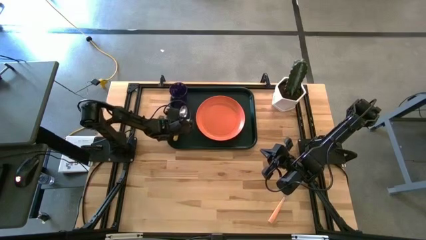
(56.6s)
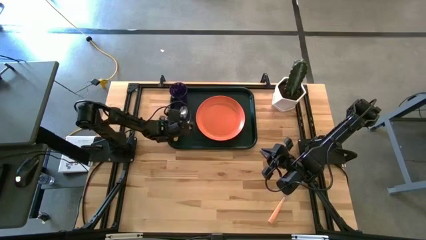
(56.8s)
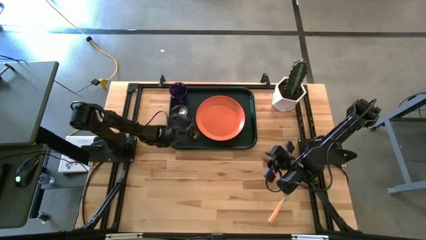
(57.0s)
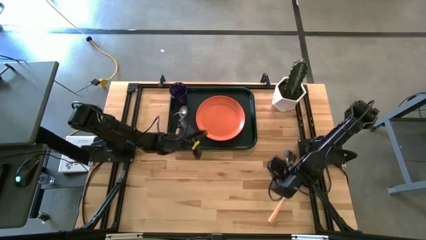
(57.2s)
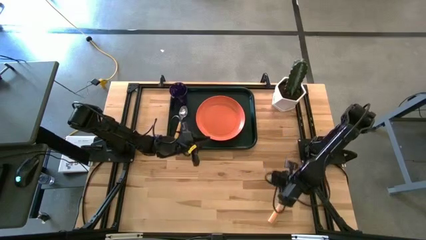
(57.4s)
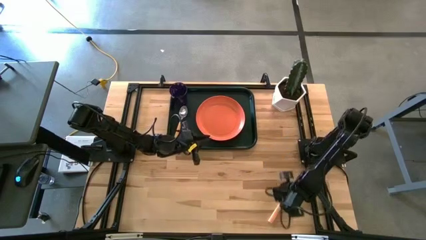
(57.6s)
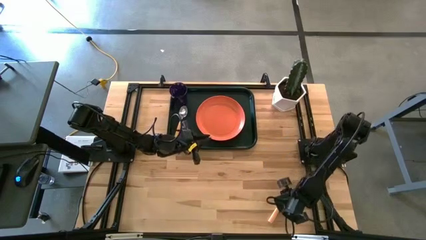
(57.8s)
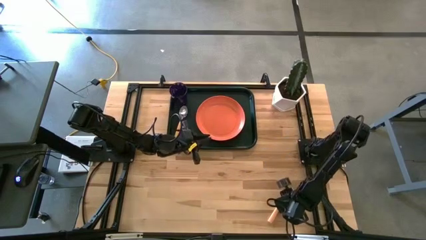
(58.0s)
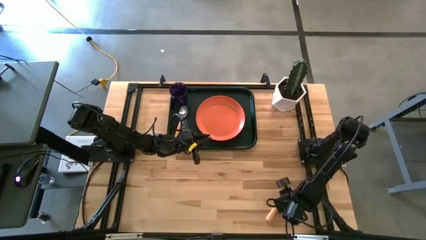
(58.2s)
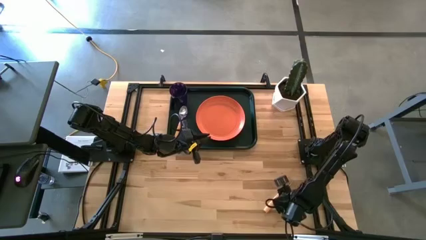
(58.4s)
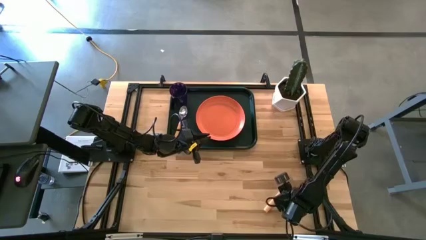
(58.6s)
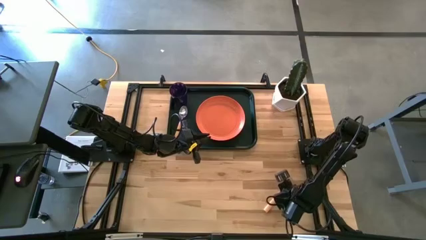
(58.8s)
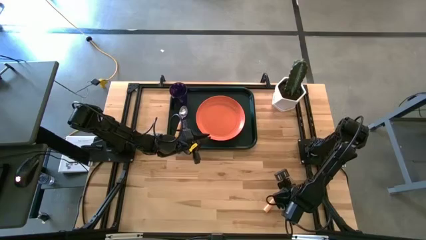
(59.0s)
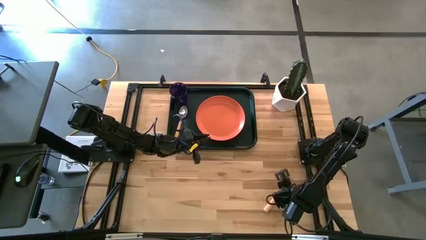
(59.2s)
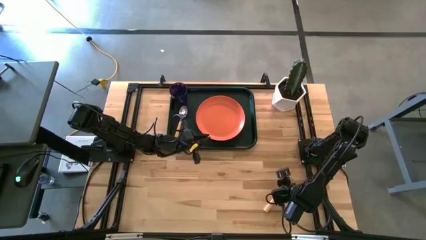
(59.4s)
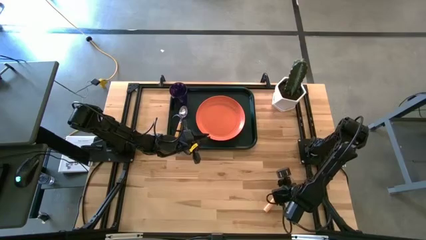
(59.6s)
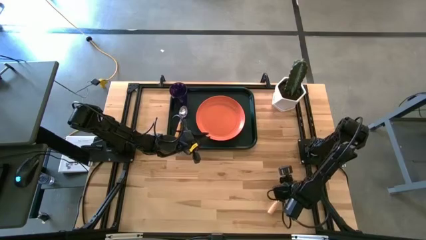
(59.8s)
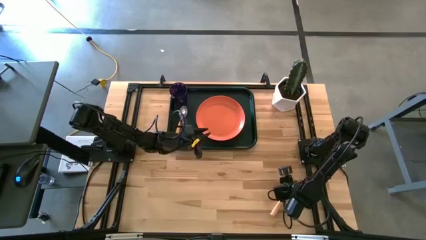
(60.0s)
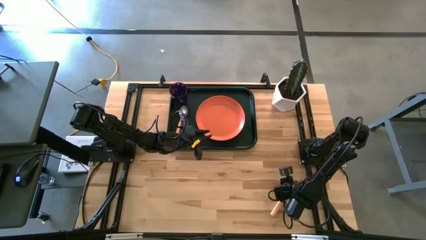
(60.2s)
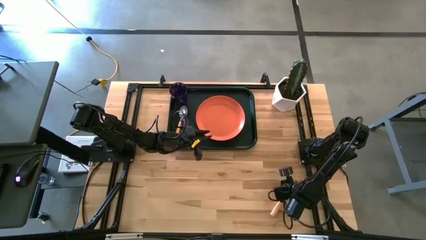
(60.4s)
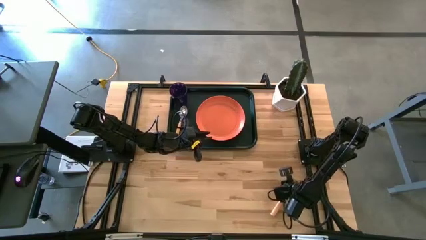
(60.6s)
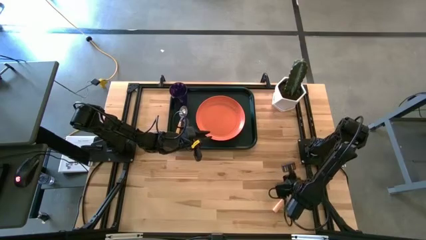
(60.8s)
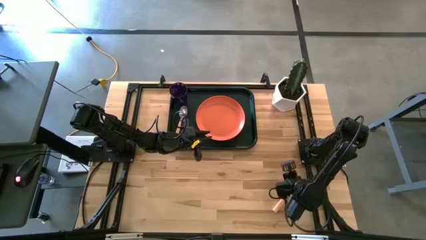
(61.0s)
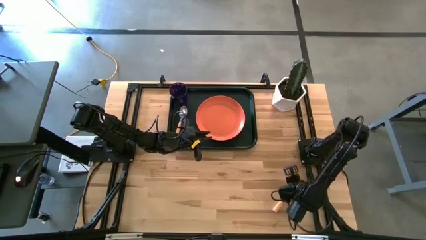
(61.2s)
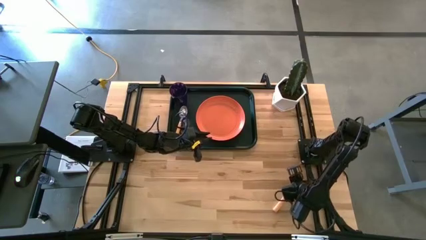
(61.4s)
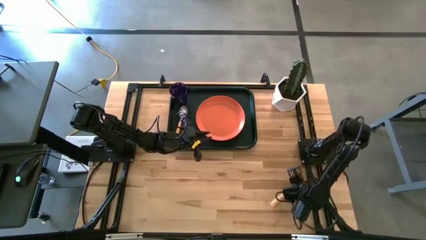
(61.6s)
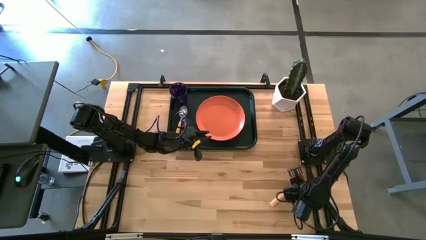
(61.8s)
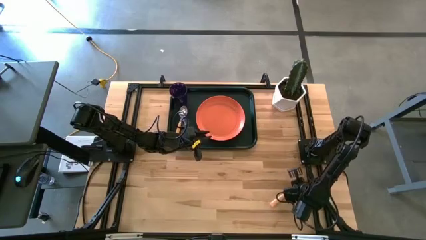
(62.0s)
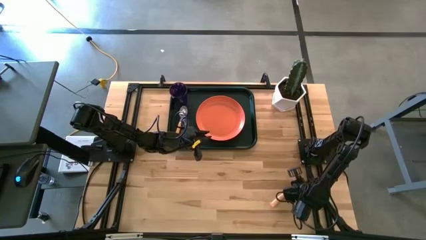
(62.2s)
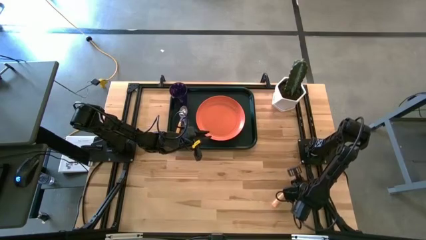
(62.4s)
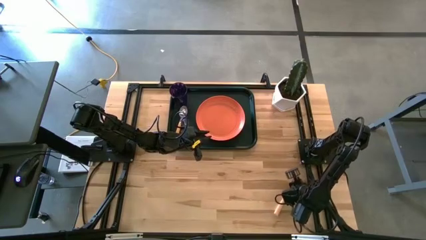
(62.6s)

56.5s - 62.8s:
Task: Pick and place plate/cup/fork/spoon on tray
Put the fork on the left side of the serving tray, between the plate and the spoon

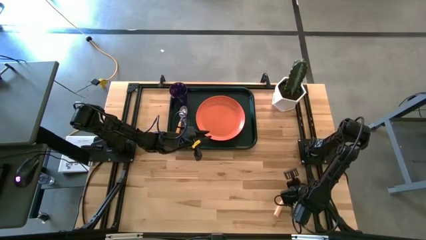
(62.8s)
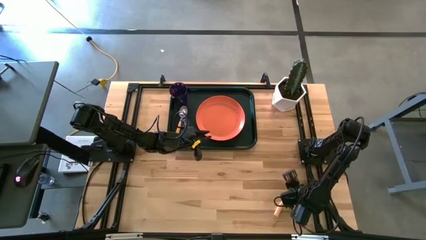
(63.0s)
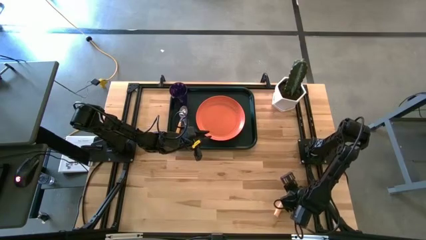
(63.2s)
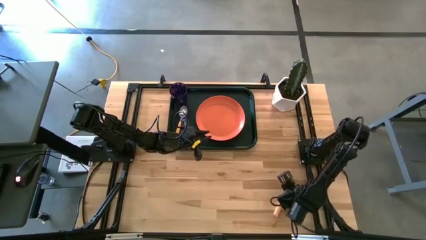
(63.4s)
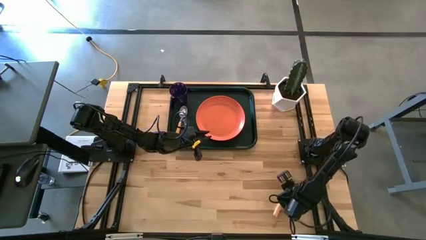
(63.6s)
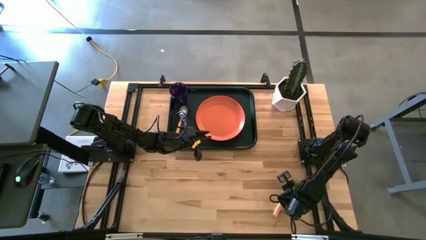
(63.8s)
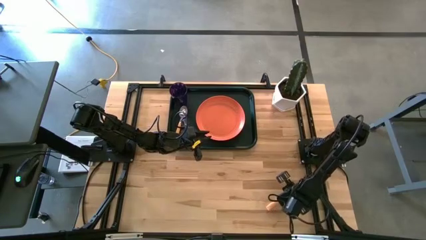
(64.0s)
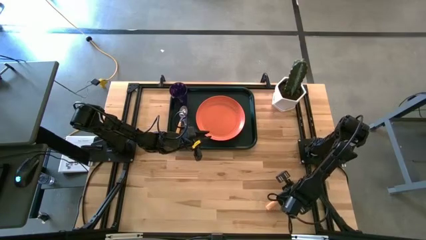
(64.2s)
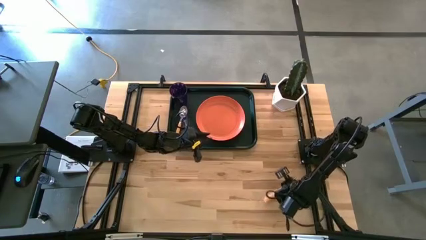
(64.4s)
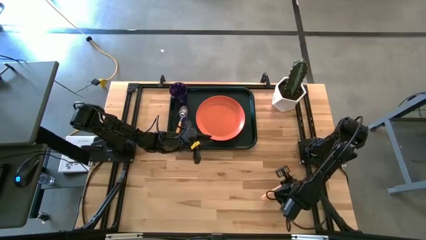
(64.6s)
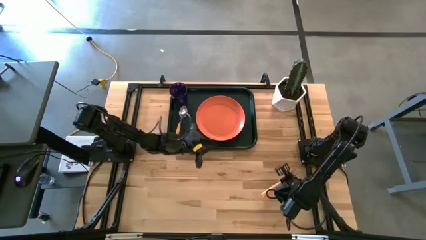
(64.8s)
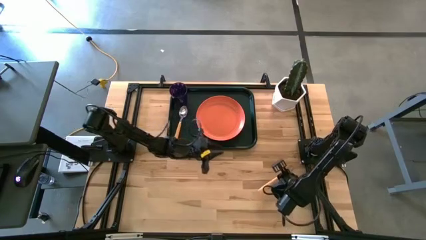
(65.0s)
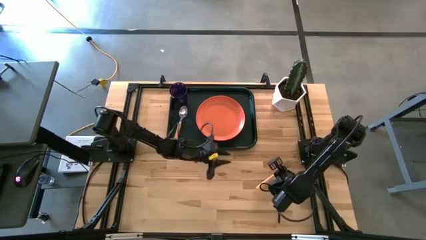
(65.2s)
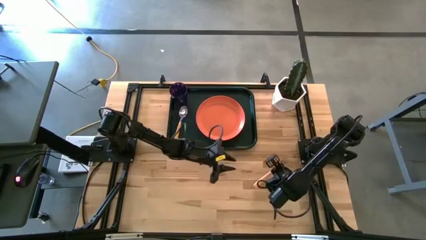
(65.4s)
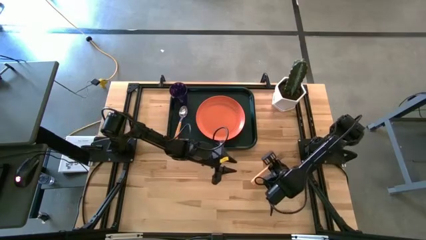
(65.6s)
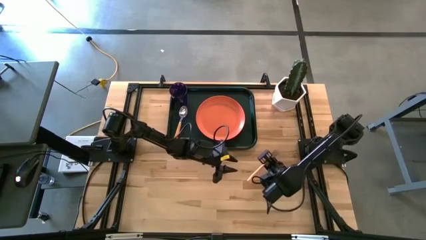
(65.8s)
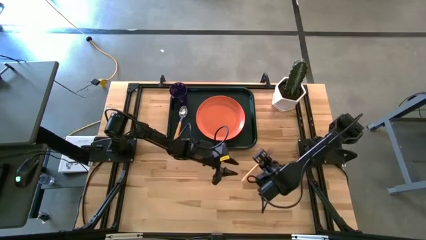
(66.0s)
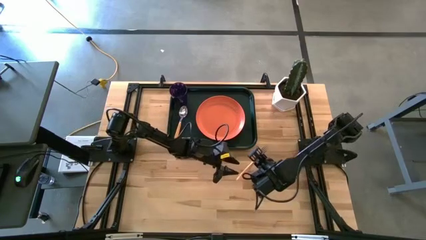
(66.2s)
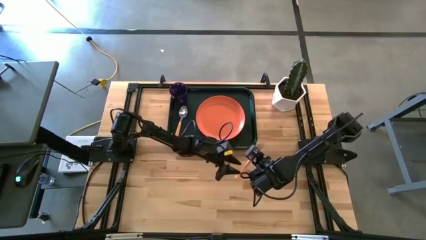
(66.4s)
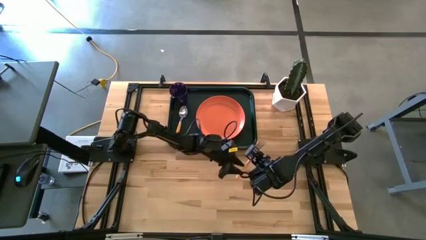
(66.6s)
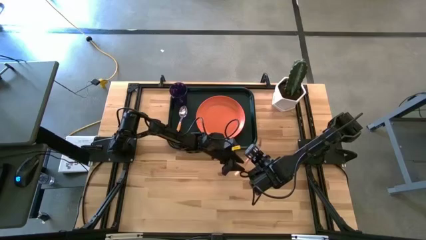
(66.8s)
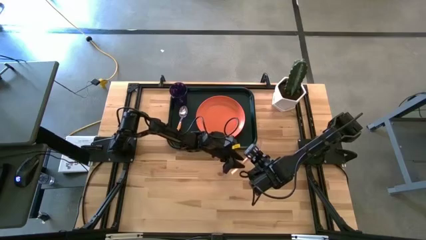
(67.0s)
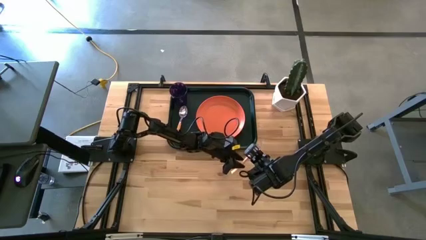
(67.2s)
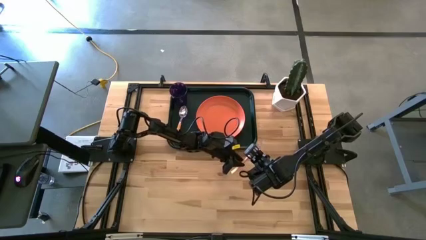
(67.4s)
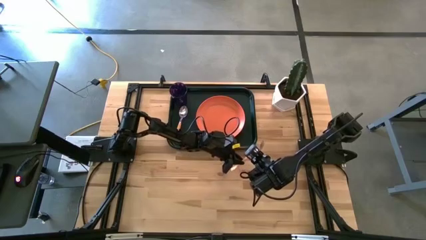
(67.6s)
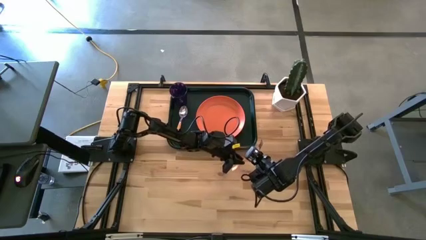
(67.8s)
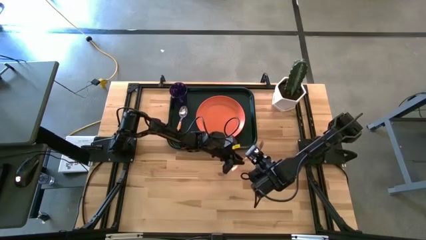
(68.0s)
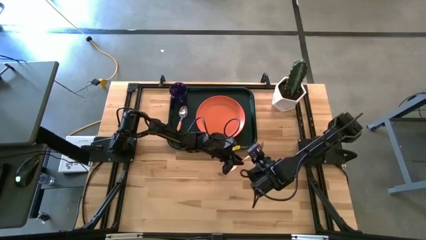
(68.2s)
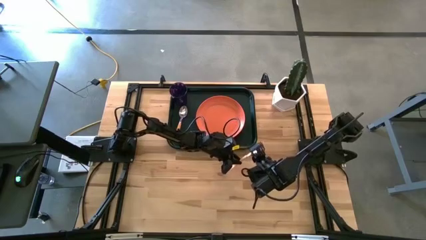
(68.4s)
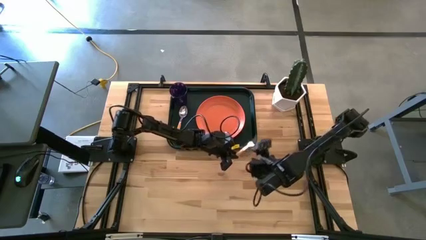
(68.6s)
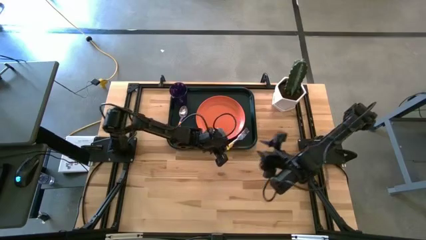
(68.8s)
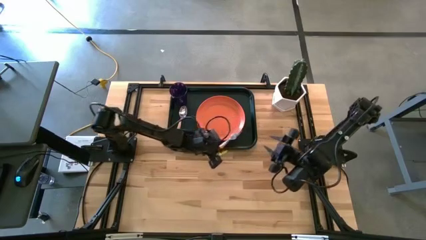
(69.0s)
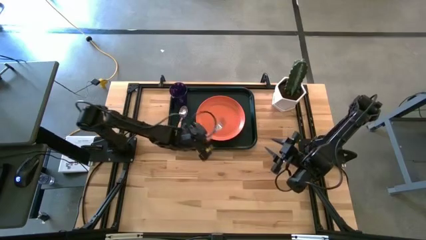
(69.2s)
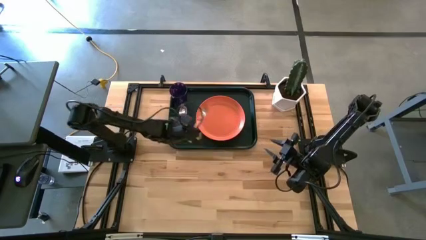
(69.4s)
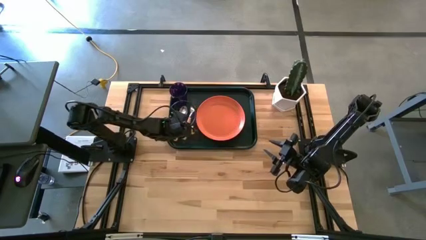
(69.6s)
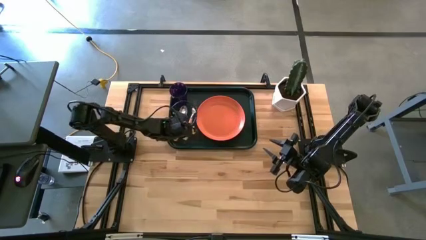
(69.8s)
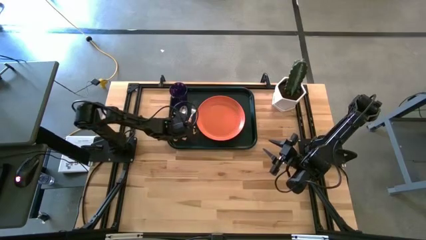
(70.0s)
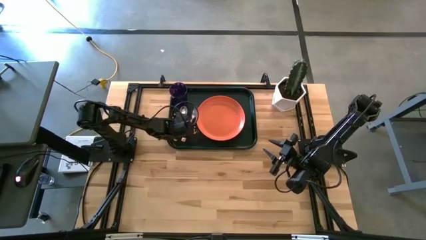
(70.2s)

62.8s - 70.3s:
Put the fork on the left side of the serving tray, between the plate and the spoon

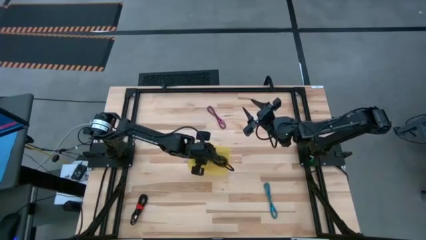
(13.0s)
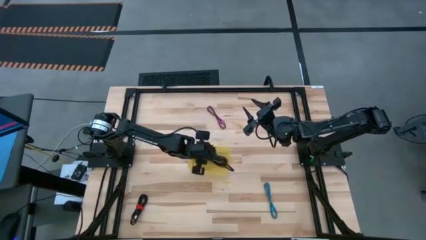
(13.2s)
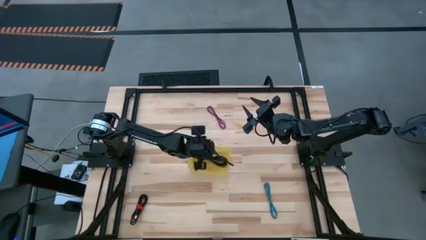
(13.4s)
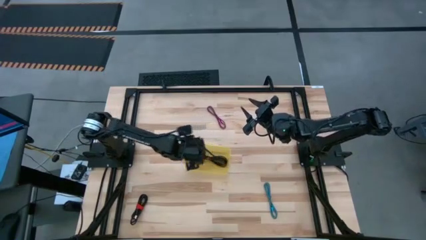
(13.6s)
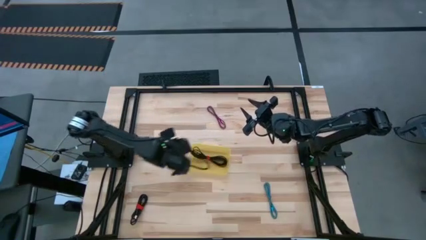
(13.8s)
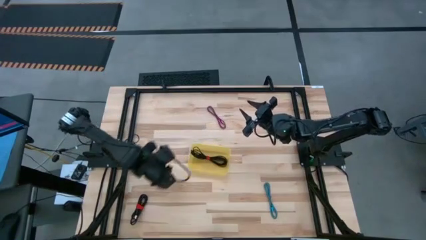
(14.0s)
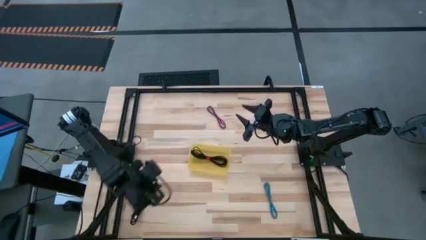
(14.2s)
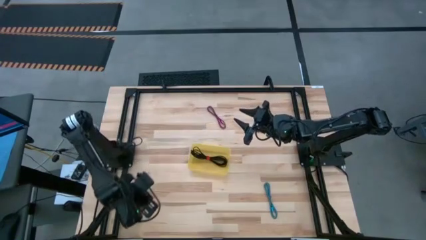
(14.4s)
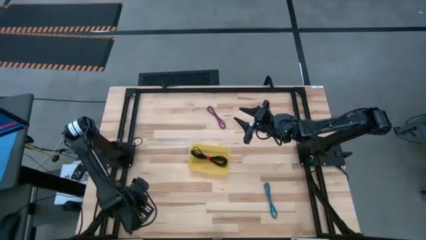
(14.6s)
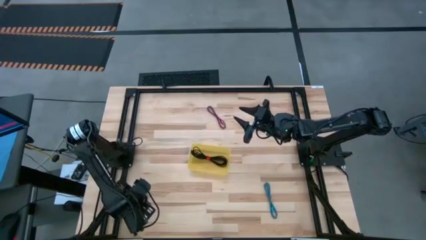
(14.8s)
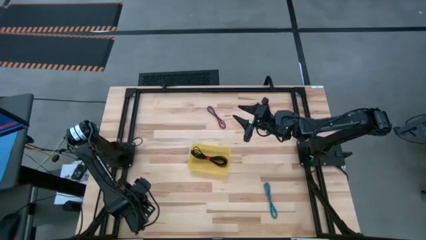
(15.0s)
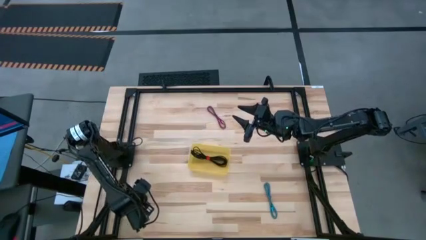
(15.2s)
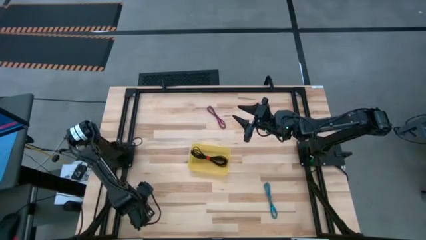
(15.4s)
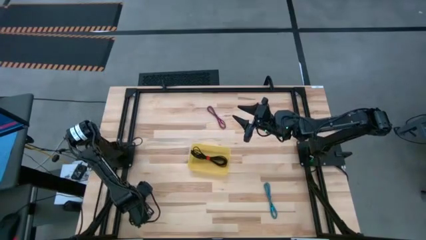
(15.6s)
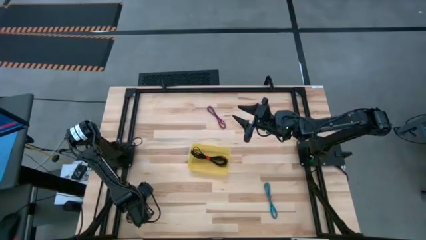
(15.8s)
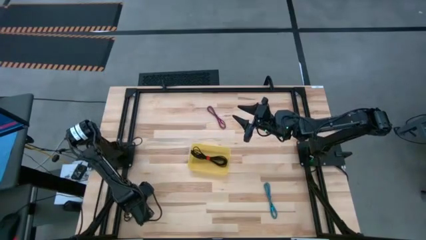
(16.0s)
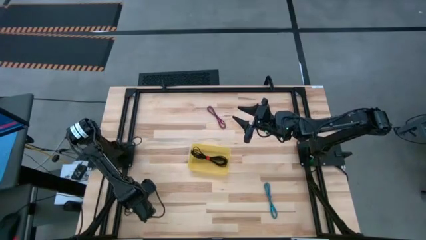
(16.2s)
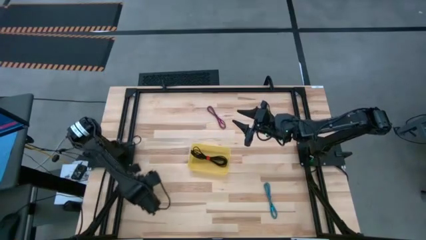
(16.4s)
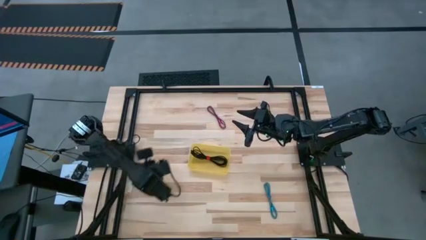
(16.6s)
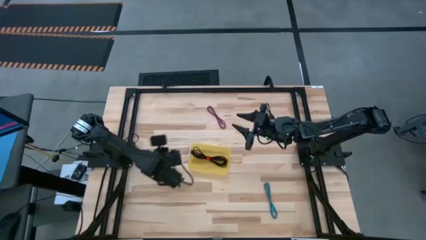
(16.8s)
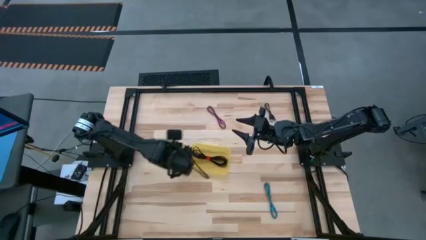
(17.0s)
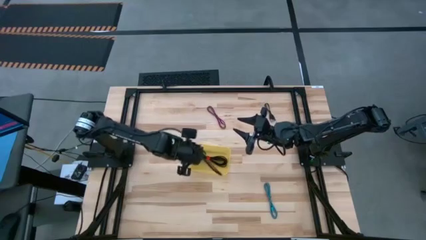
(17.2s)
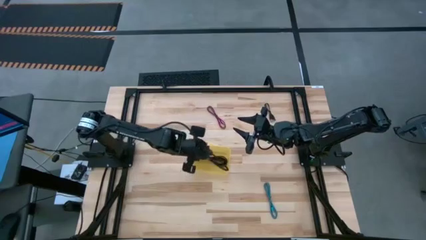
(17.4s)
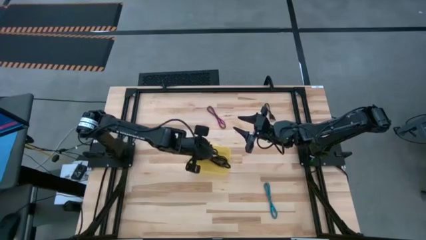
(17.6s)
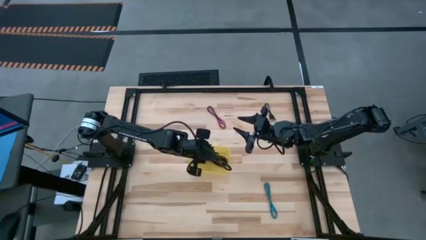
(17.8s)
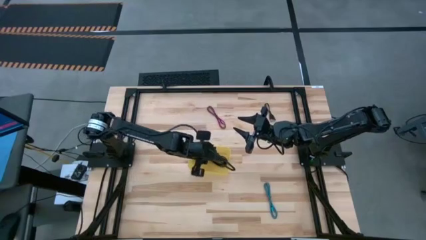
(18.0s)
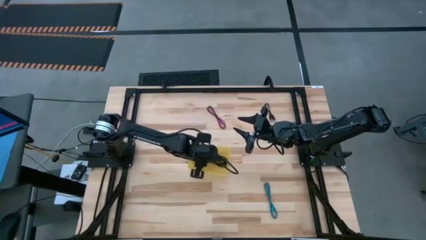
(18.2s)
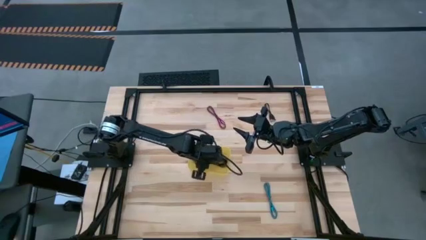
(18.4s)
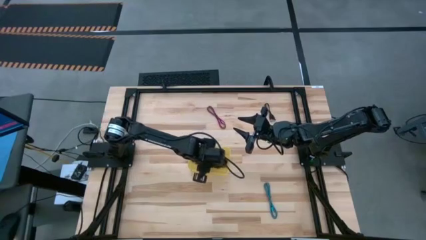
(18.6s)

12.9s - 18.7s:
Task: Pick and place USB-C Cables
Put the bottom black charger cable into the yellow bin
